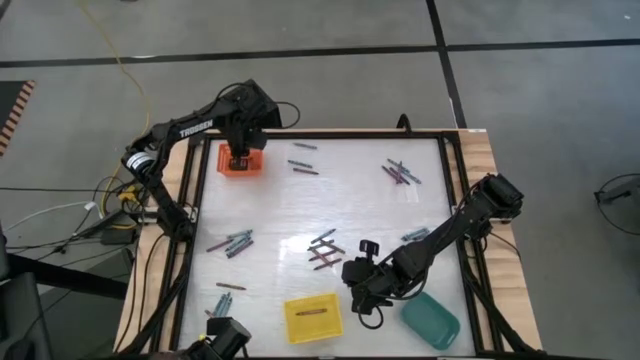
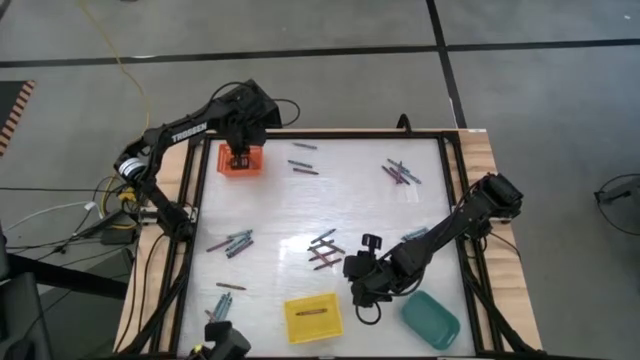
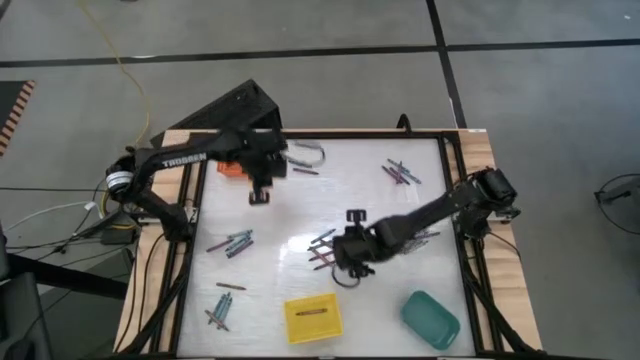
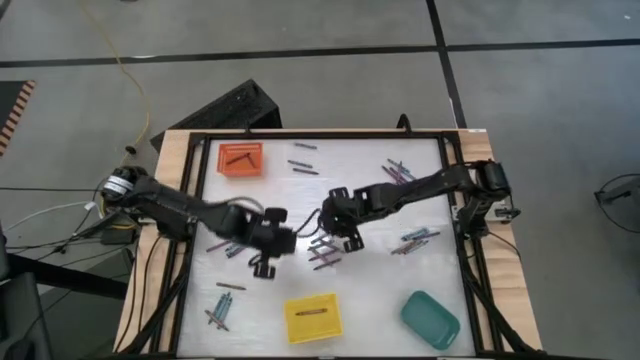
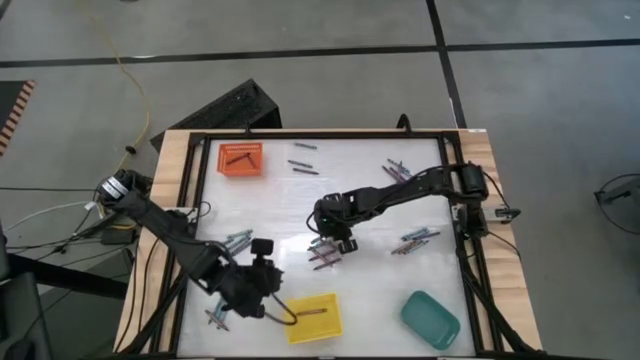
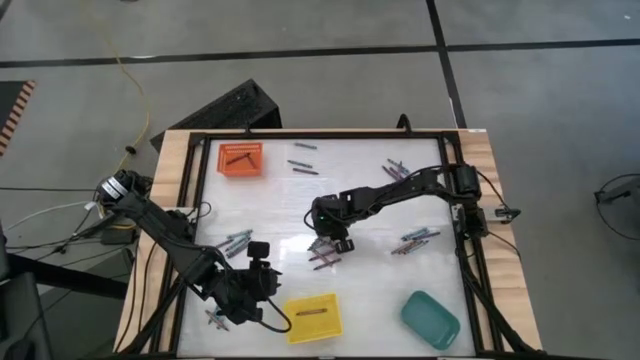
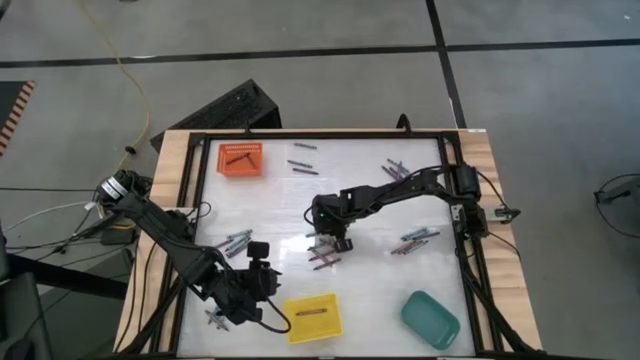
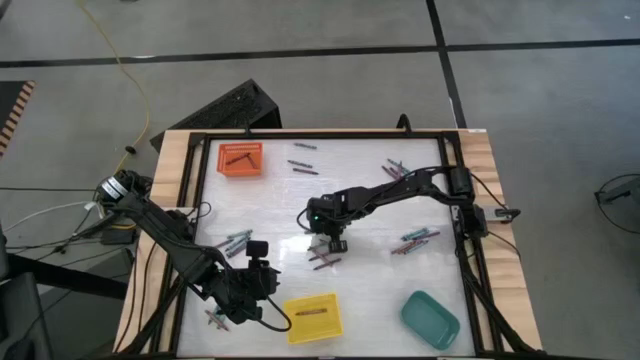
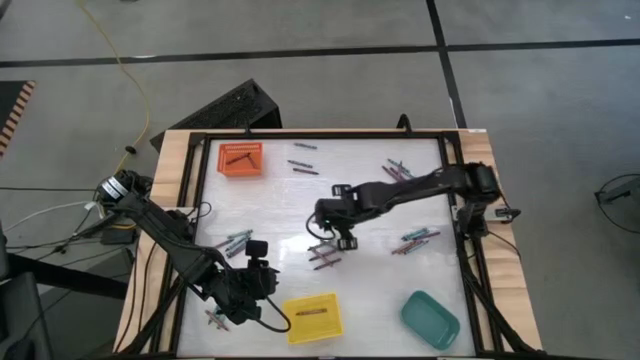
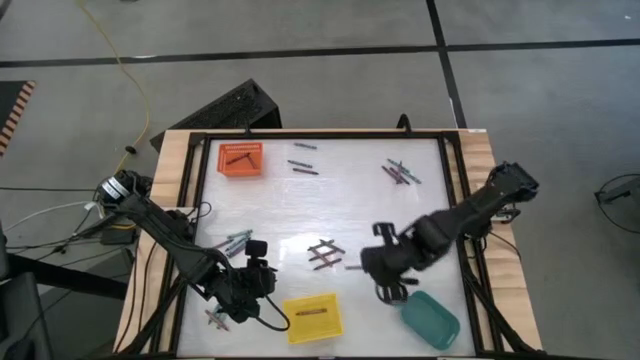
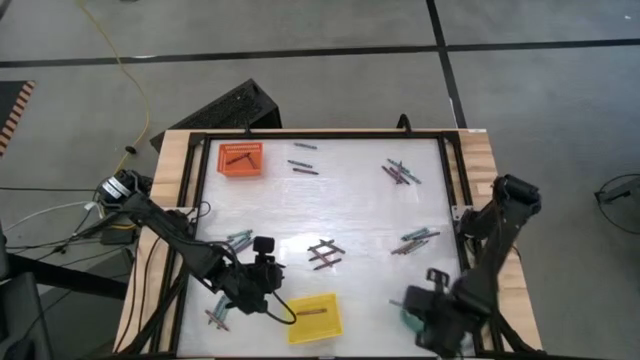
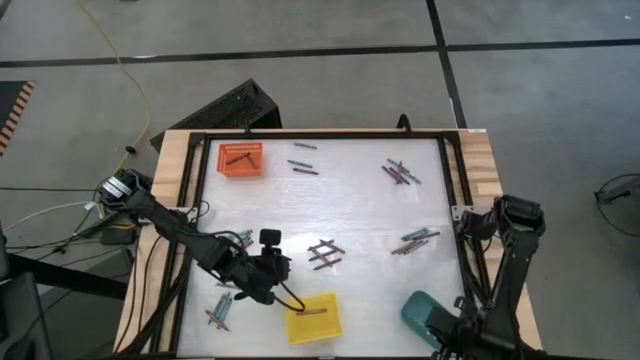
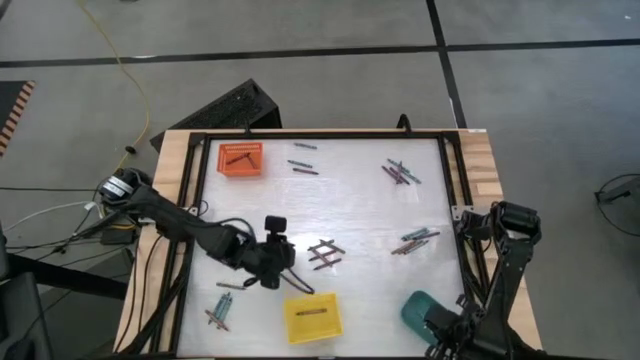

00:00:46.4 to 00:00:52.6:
Task: Sort crayons
Put the green crayon into the green bin

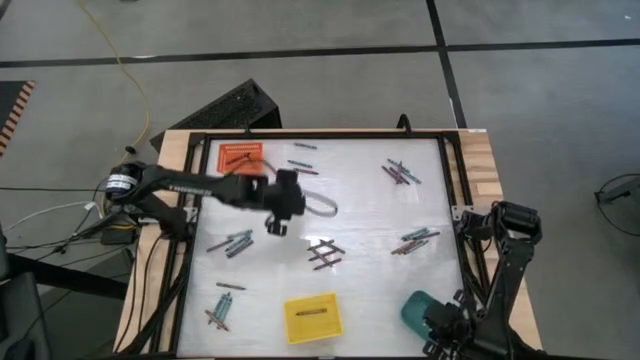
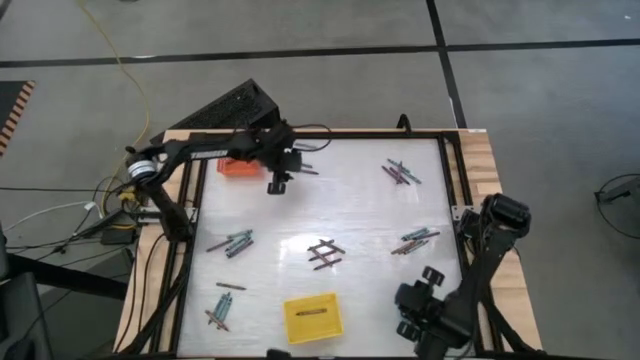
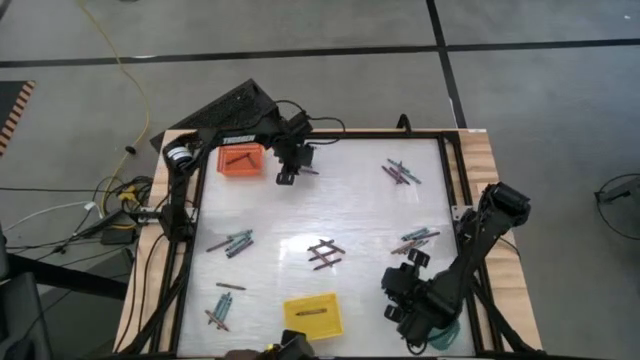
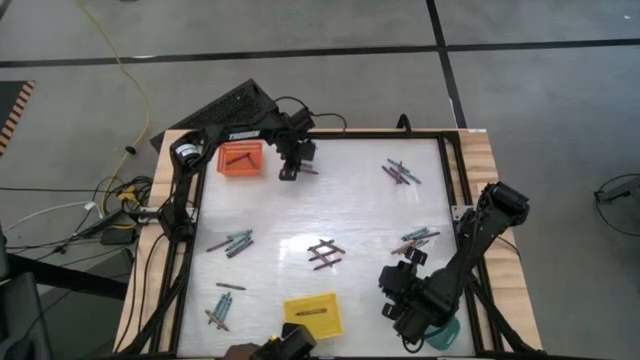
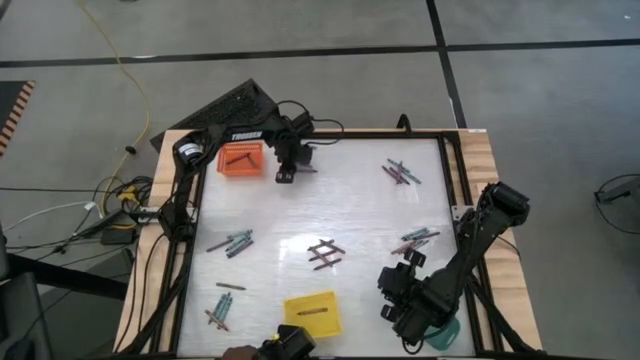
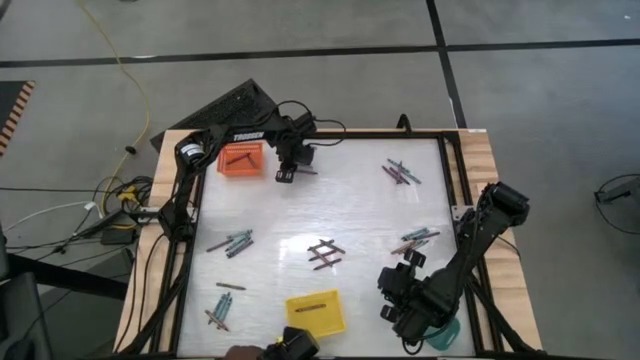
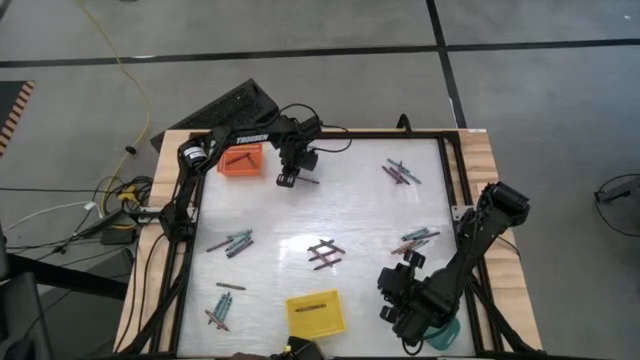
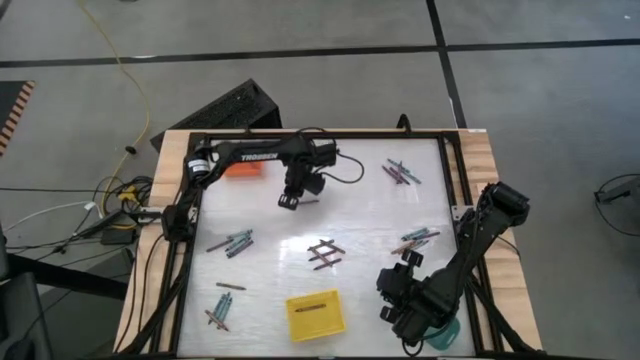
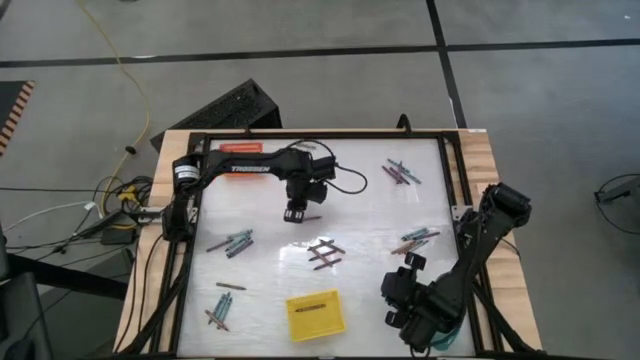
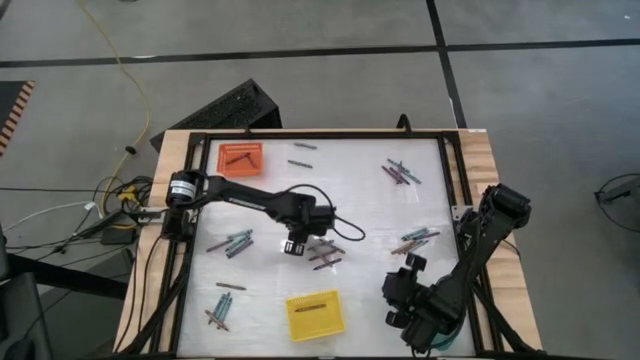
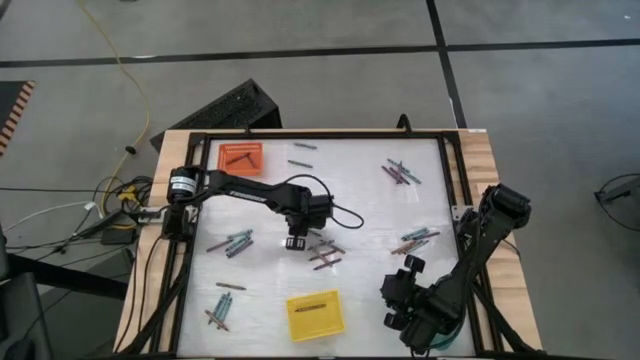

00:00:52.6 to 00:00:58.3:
Put the purple crayon into the orange bin

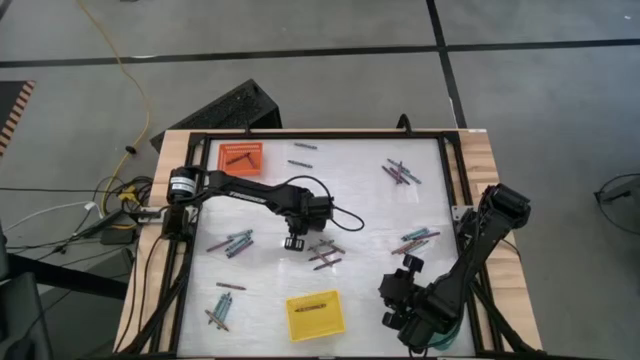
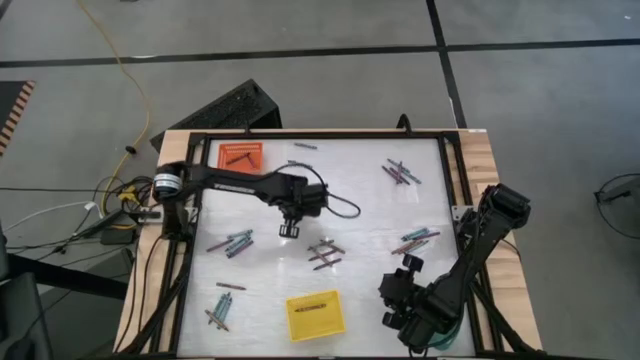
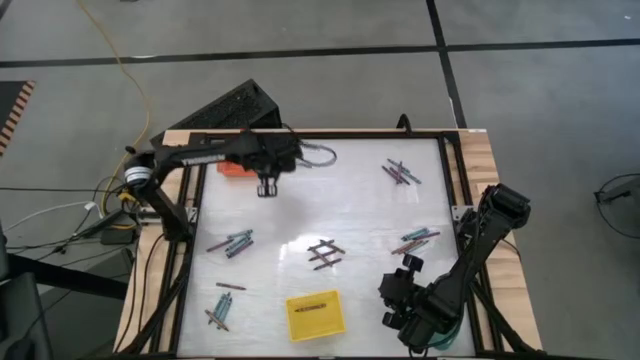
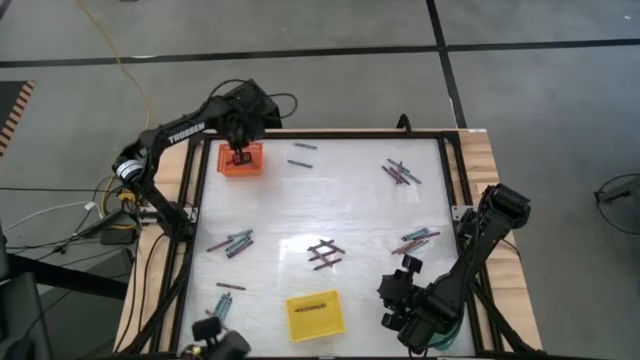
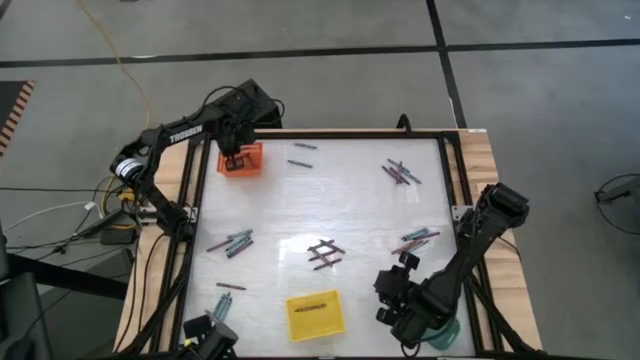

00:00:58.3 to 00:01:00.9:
Put the purple crayon into the orange bin

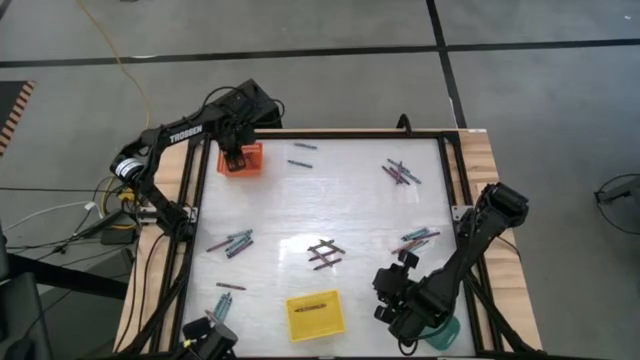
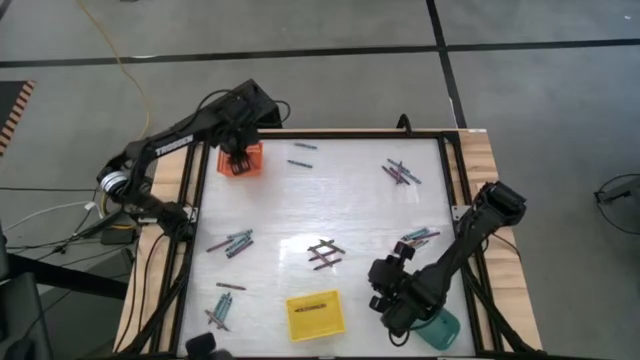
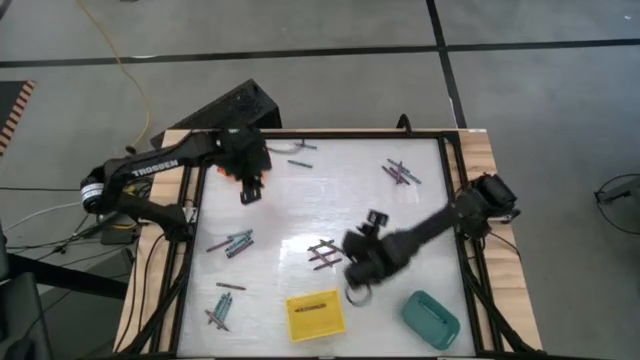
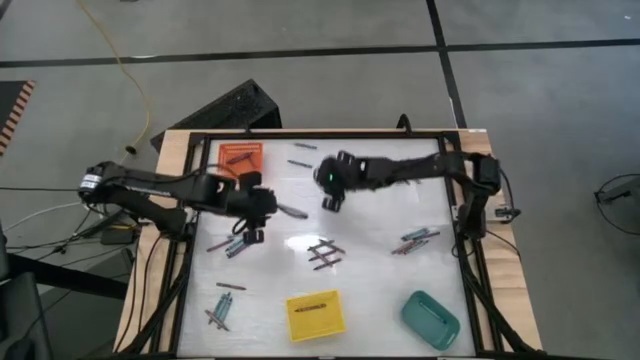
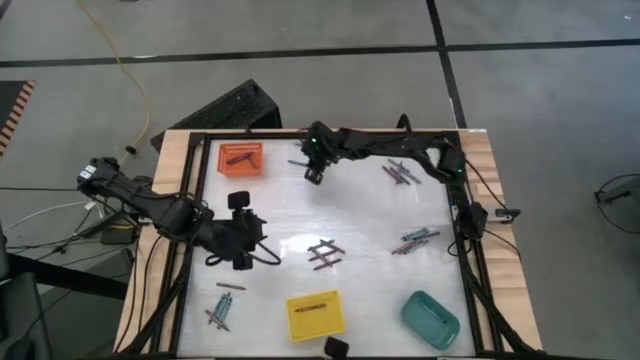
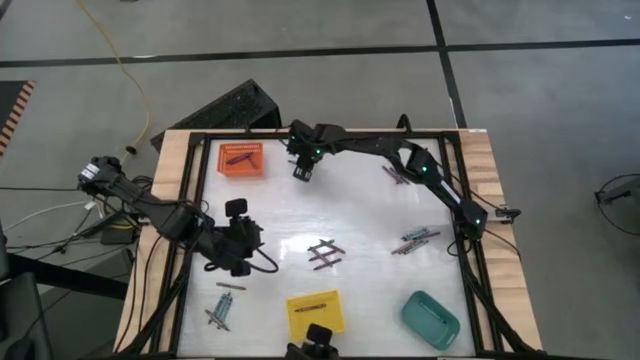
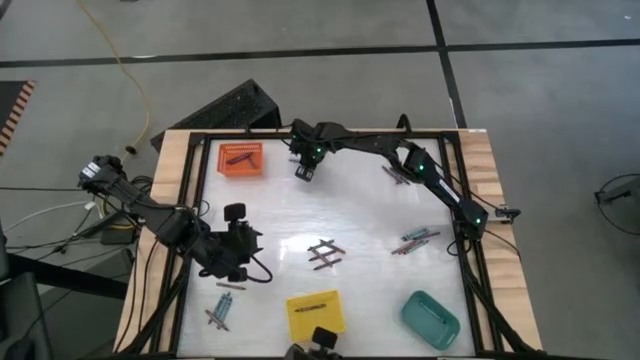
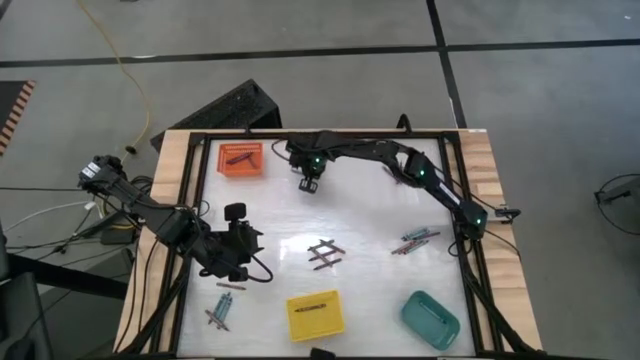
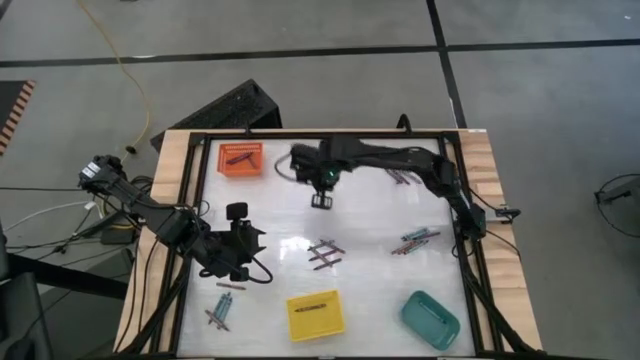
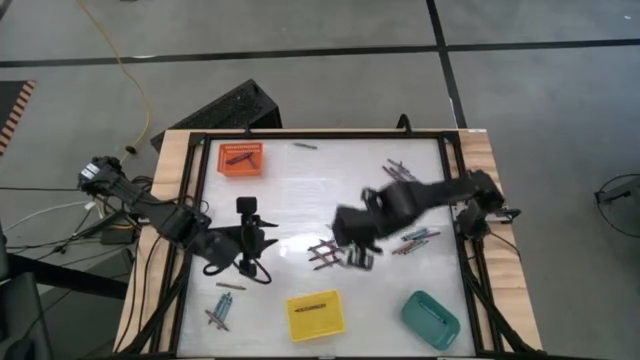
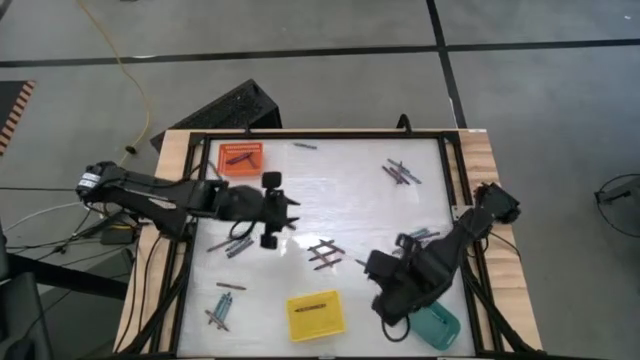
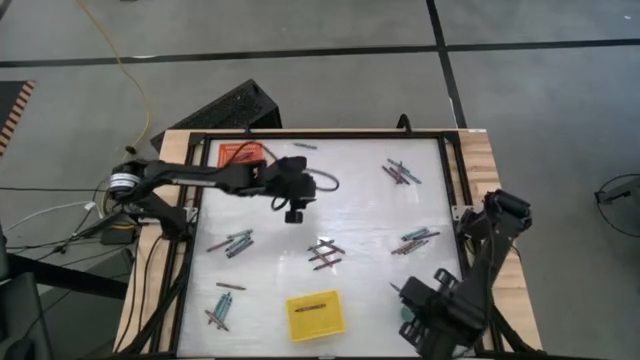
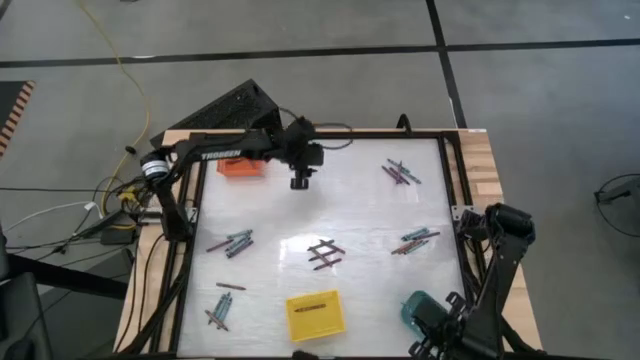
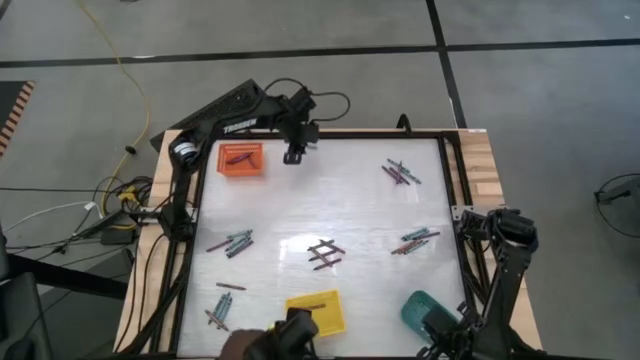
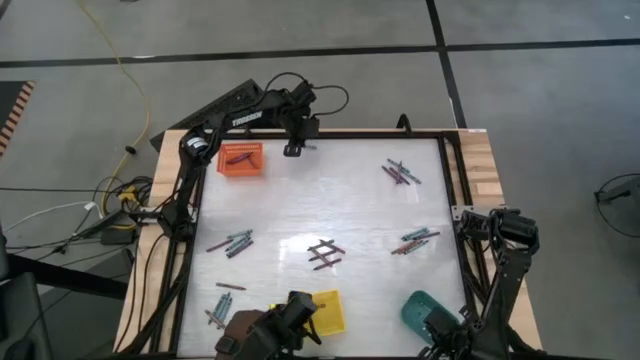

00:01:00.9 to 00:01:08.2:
Put the green crayon into the green bin
